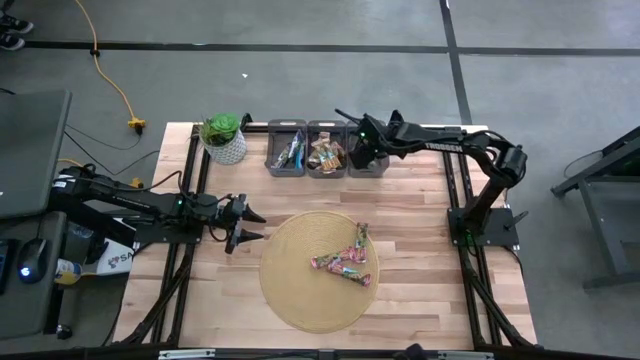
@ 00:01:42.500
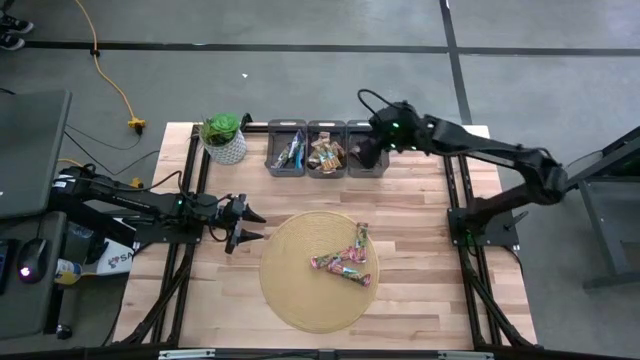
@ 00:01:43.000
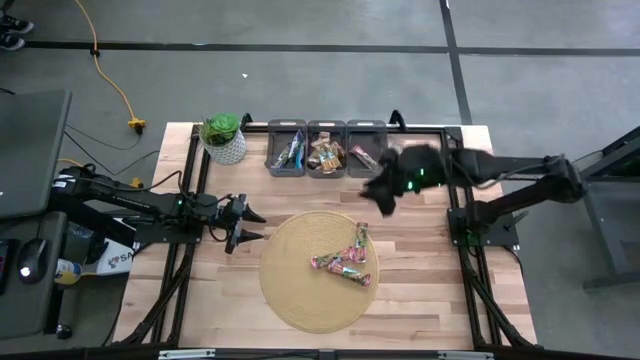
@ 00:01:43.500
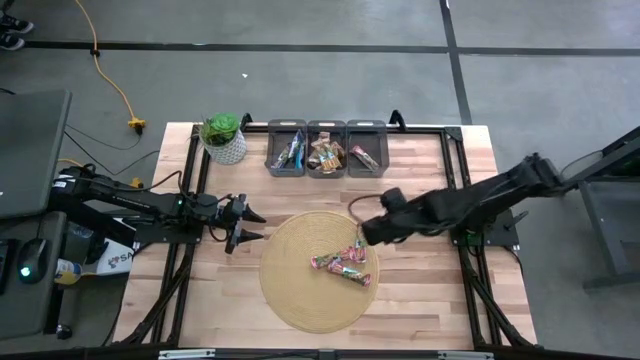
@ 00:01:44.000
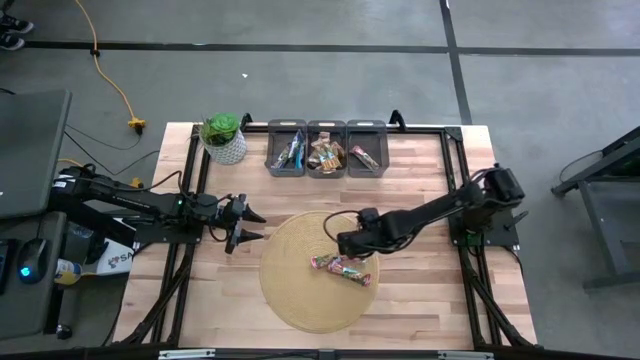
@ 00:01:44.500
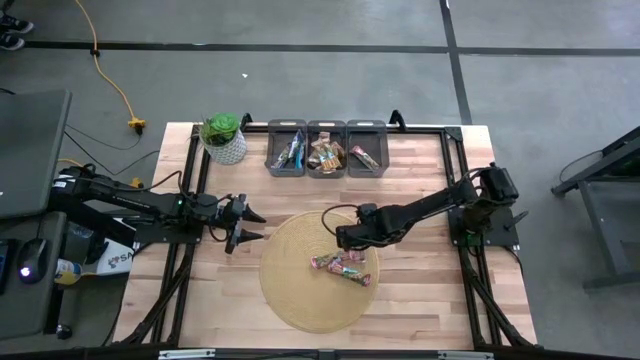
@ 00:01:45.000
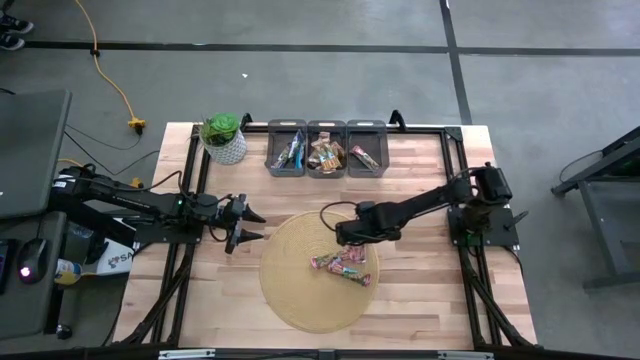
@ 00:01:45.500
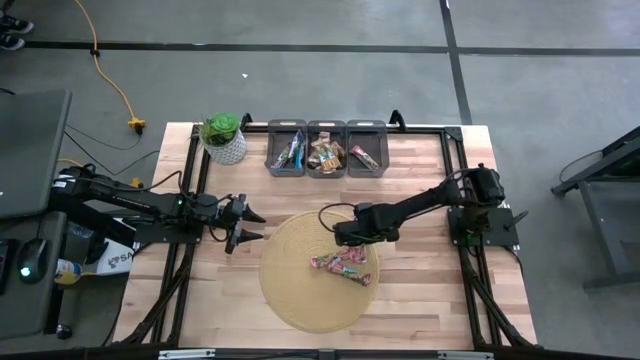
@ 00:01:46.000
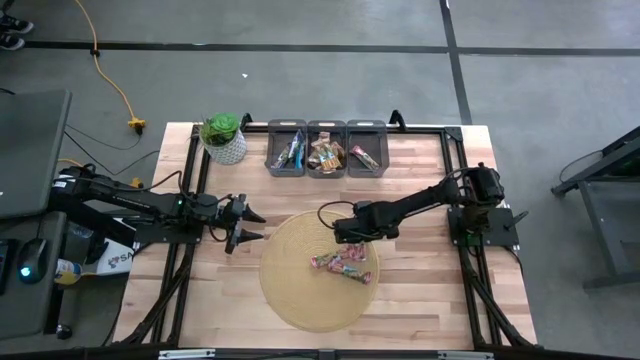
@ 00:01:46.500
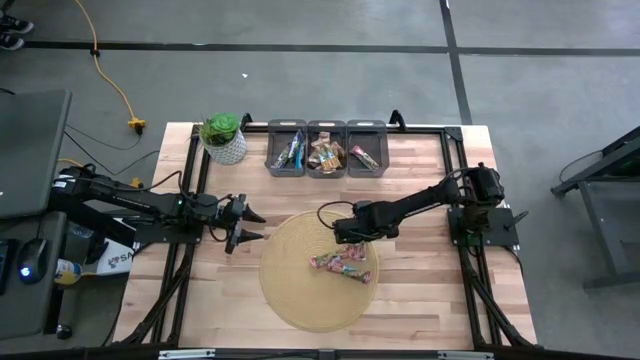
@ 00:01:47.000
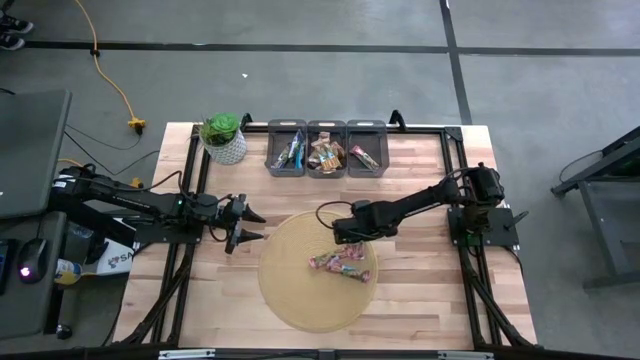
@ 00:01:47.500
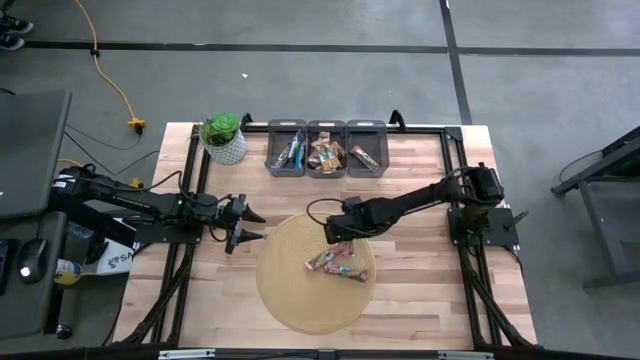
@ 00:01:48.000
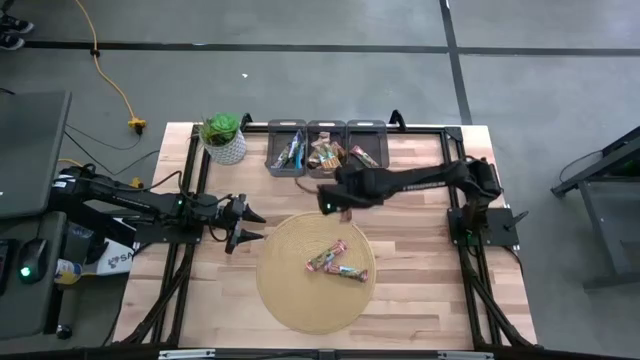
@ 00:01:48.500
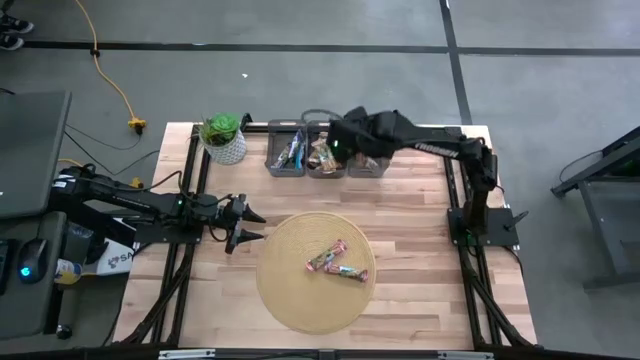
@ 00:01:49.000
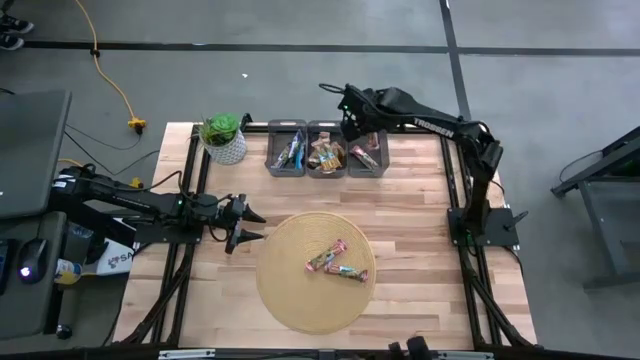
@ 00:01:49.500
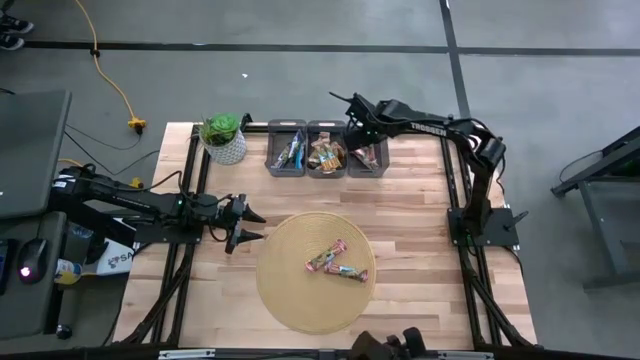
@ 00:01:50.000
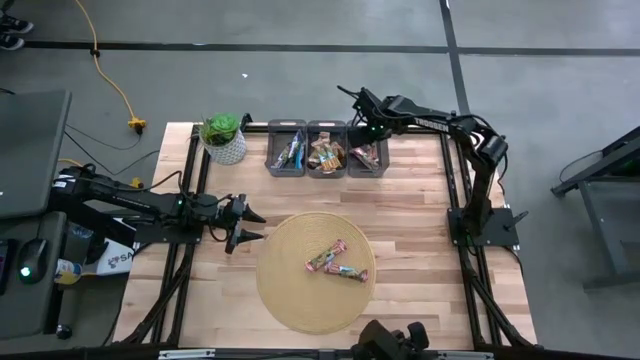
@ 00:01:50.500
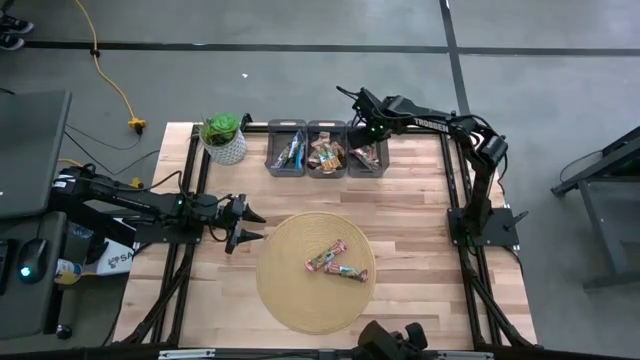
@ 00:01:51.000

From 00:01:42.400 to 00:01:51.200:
Task: Pick and place Granola Bars by type
Put the red granola bar into the right black bin

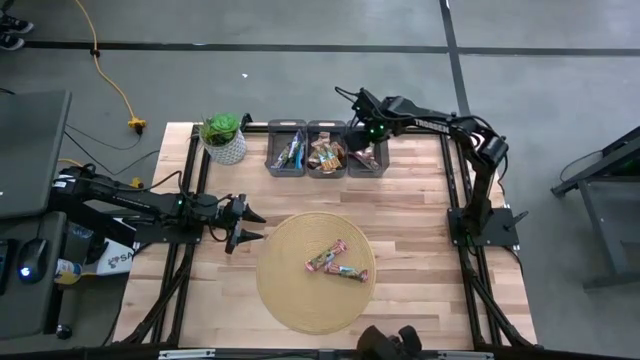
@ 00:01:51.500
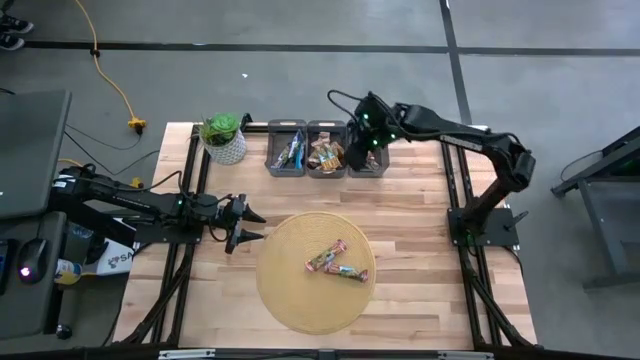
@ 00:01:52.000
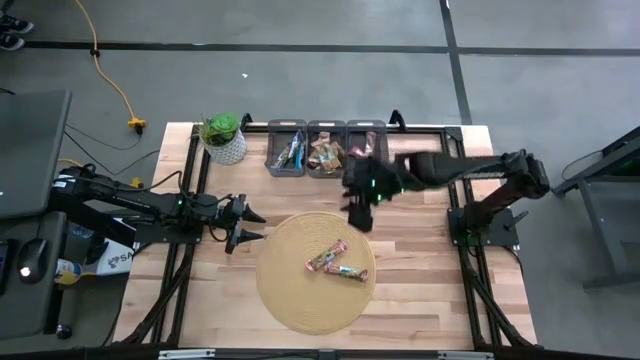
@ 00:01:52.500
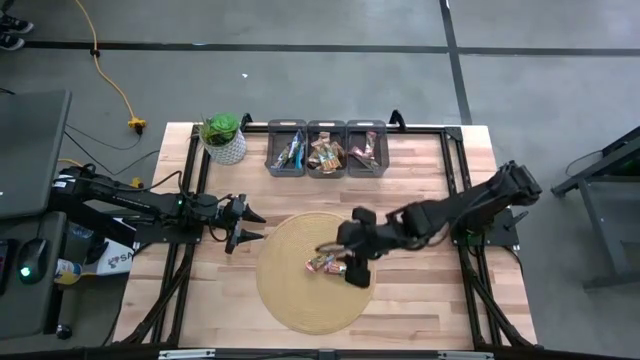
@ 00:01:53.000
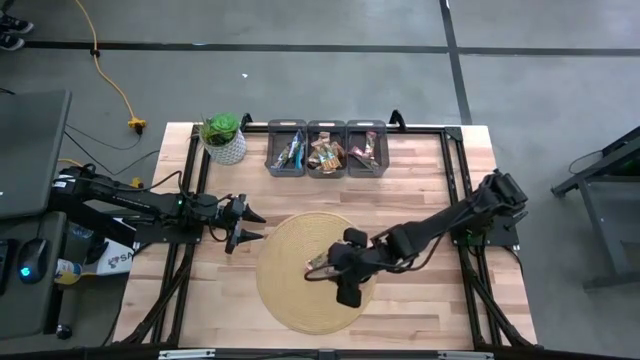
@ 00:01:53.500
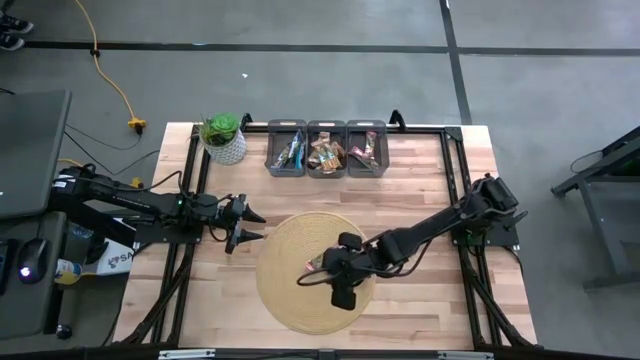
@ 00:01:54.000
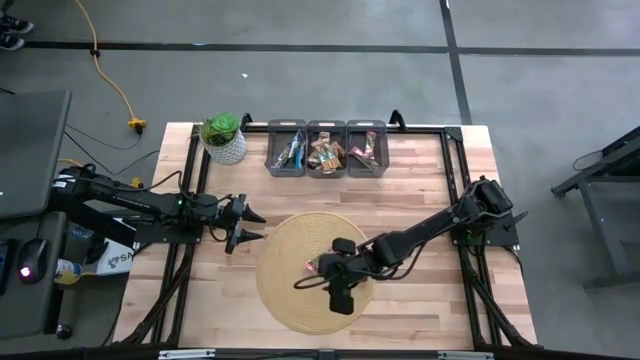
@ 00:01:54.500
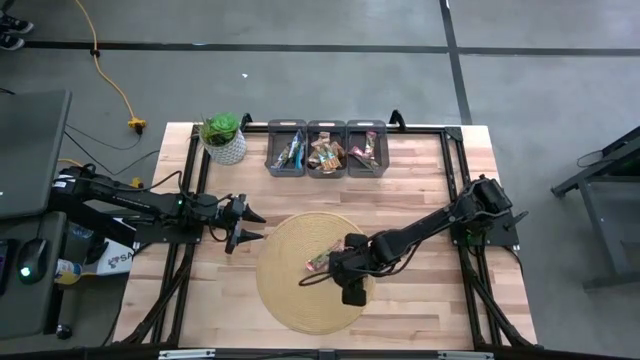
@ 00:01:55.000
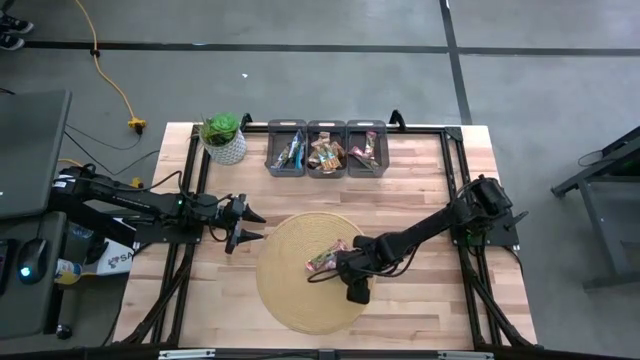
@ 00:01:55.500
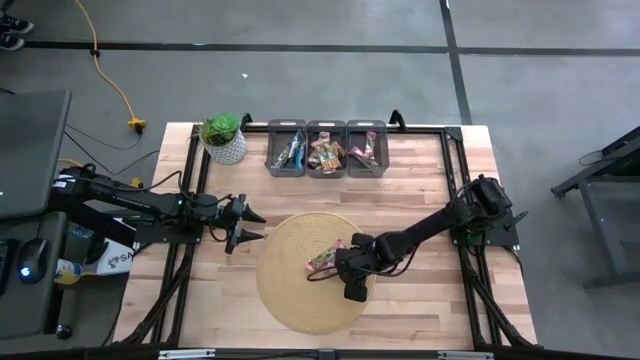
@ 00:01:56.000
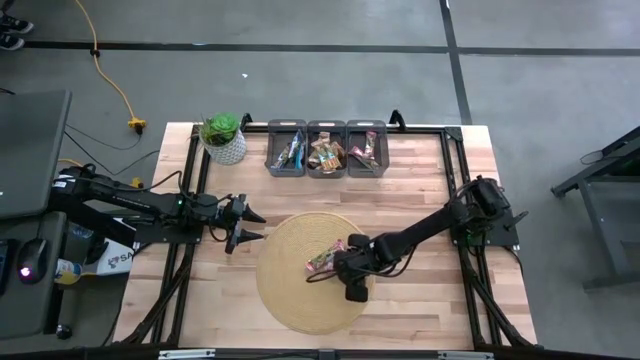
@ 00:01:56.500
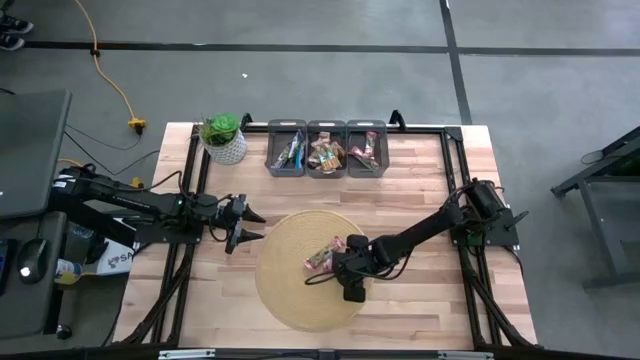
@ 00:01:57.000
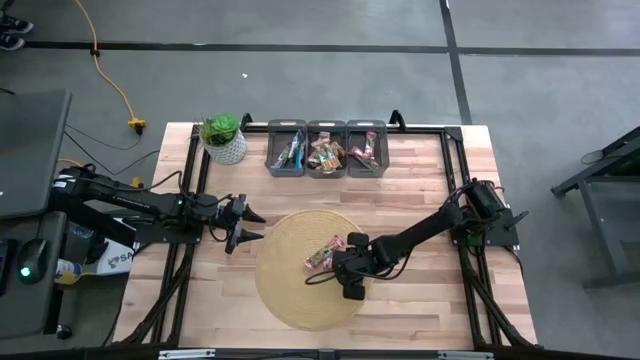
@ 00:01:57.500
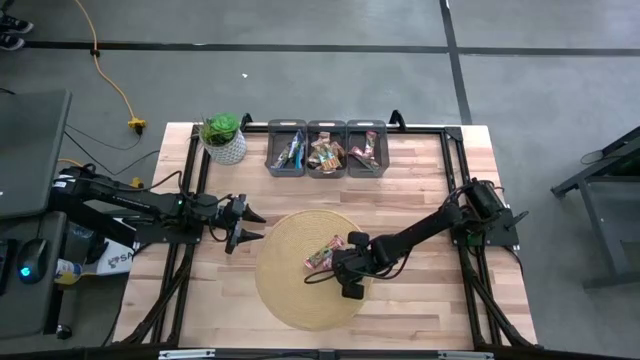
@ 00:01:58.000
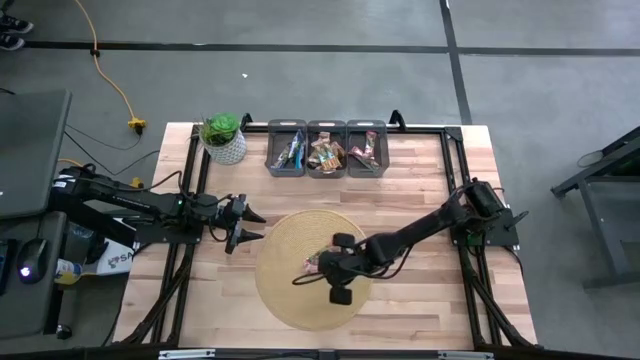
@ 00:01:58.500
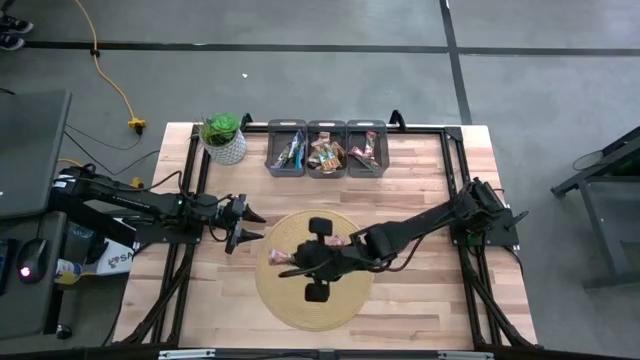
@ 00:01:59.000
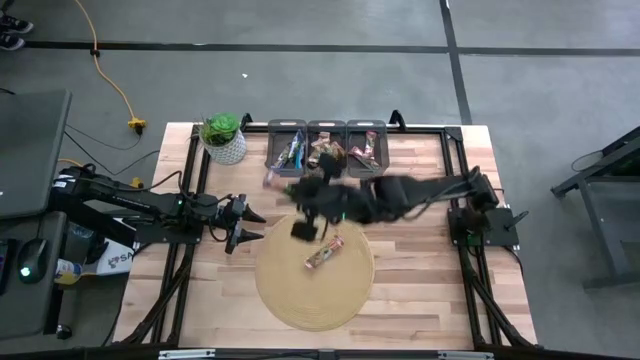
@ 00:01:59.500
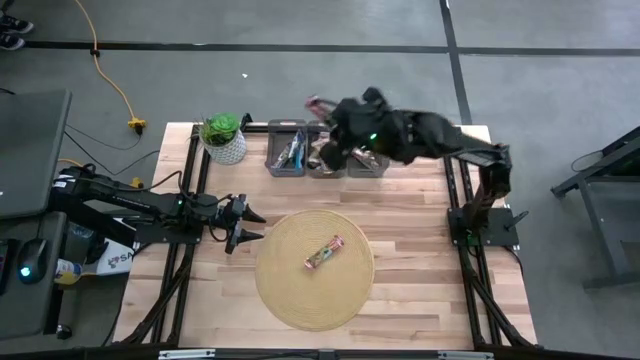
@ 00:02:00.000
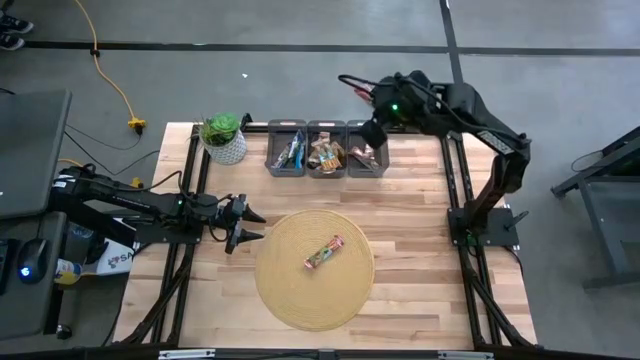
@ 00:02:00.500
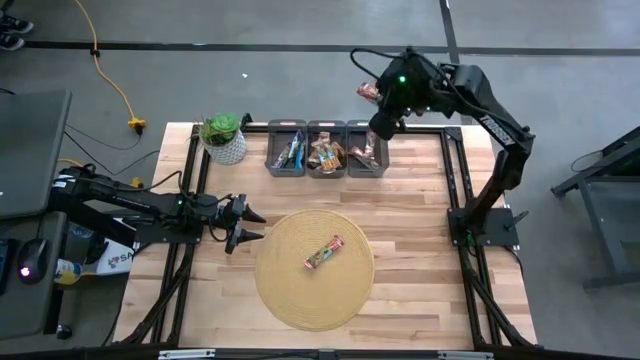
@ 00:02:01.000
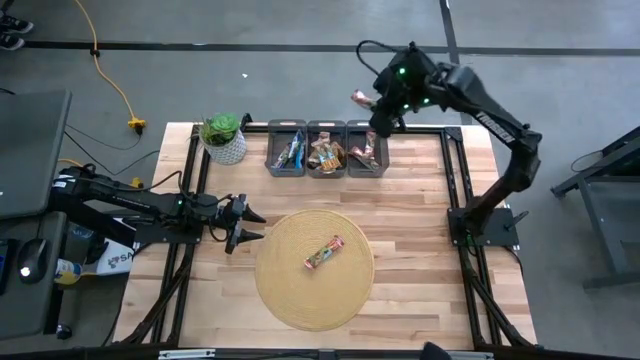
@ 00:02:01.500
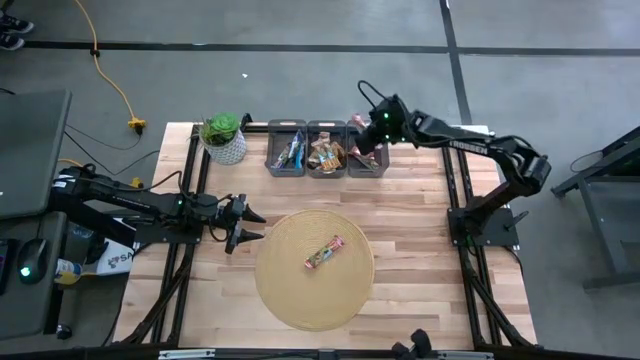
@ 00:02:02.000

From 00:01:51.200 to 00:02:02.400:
Put the red granola bar into the right black bin

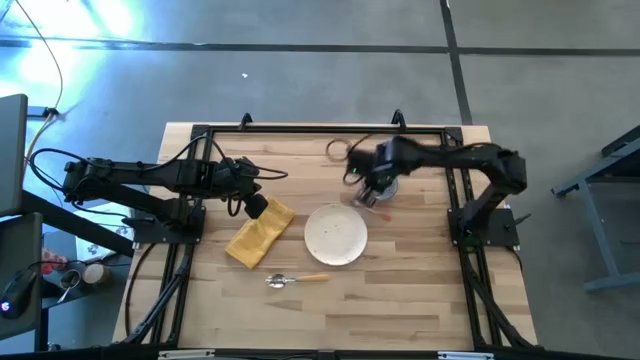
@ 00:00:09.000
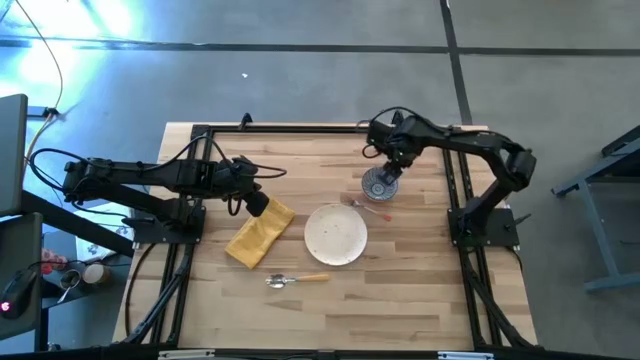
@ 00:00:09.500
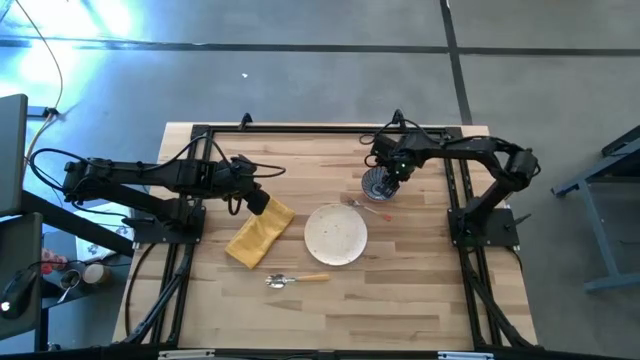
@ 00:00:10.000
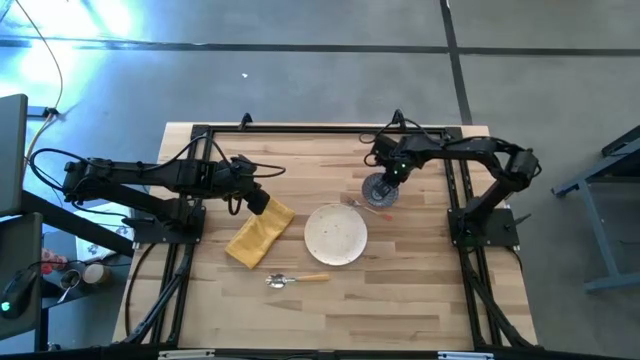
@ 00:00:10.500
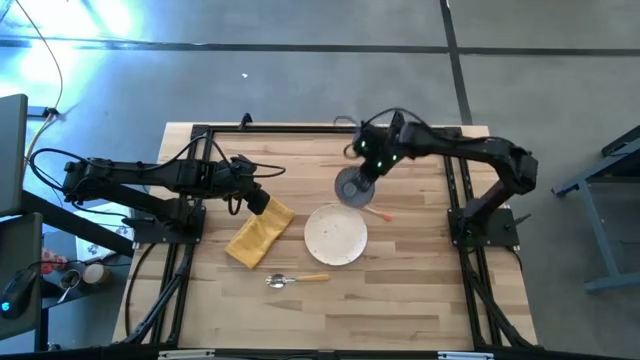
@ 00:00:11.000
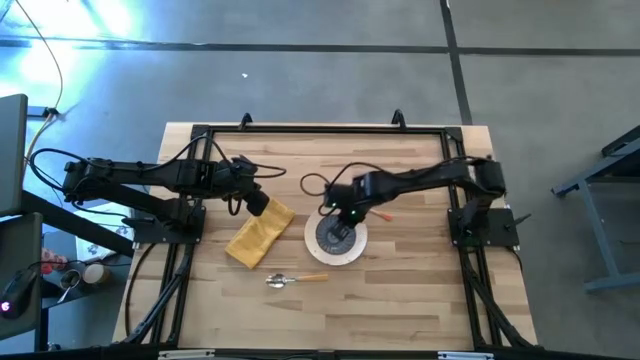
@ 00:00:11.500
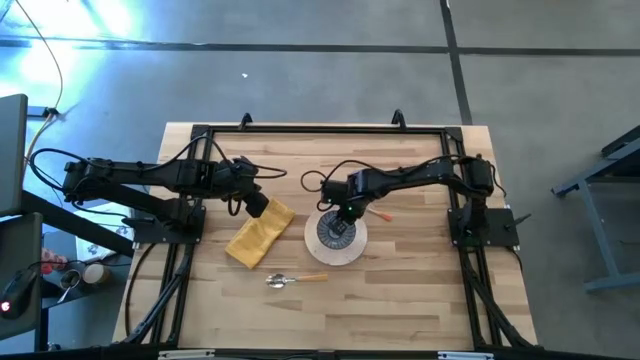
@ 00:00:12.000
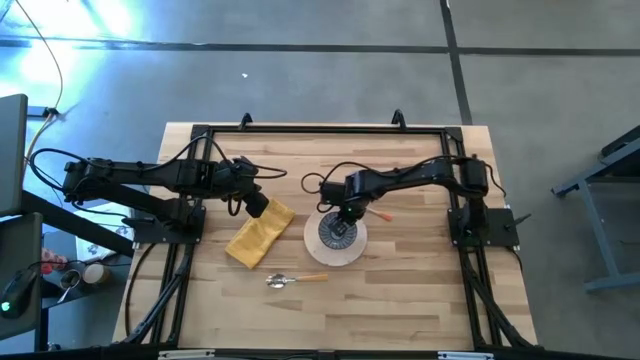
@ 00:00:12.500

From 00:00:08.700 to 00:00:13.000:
Task: Set table place
Put the blue patterned bowl on the white patterned plate
